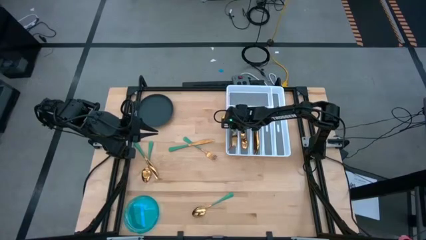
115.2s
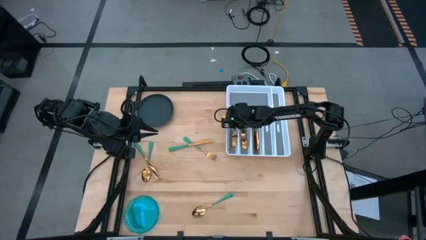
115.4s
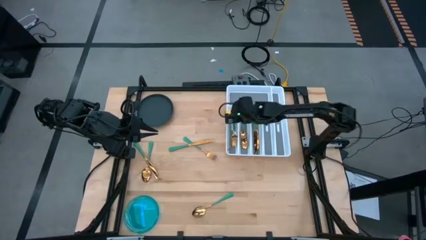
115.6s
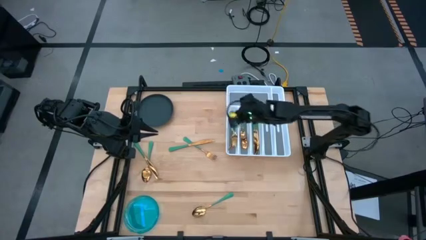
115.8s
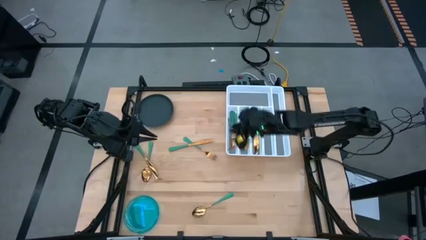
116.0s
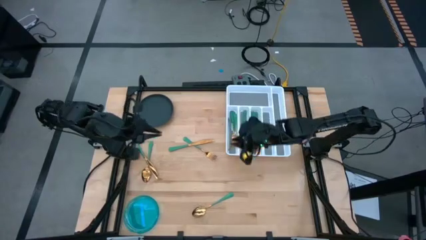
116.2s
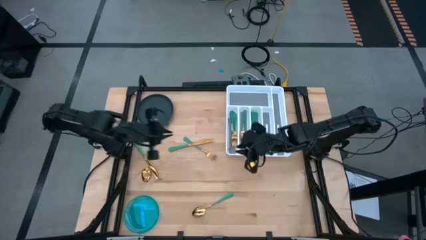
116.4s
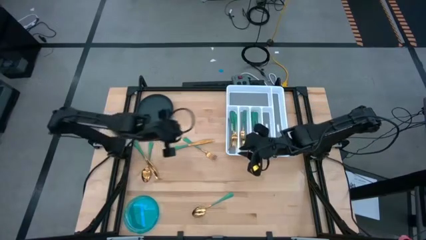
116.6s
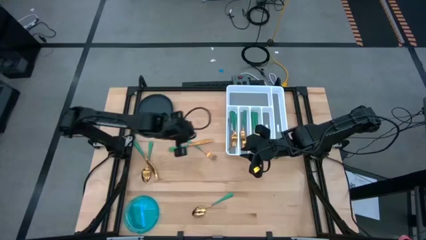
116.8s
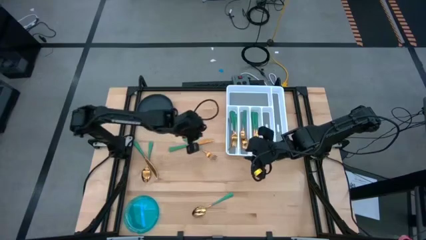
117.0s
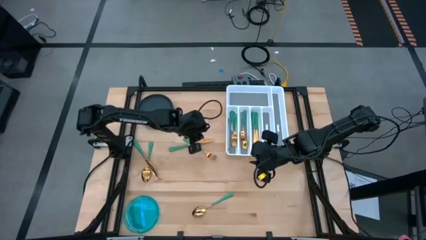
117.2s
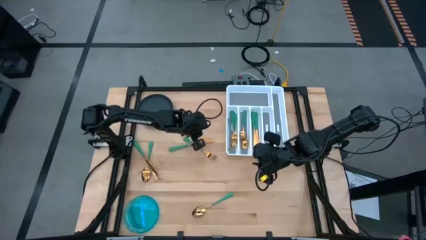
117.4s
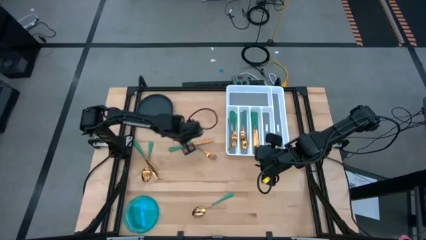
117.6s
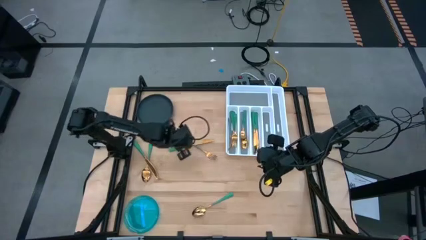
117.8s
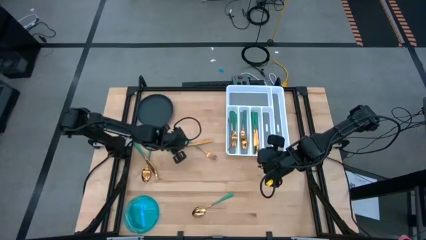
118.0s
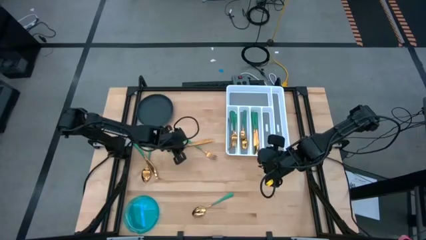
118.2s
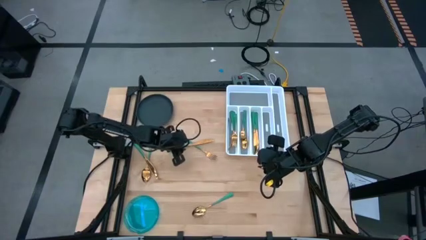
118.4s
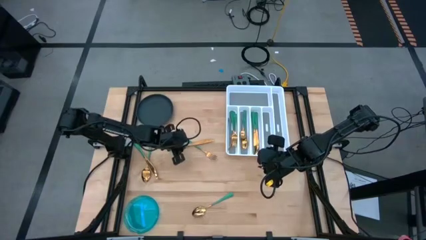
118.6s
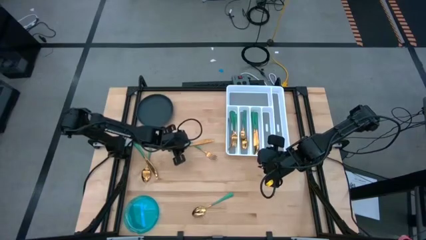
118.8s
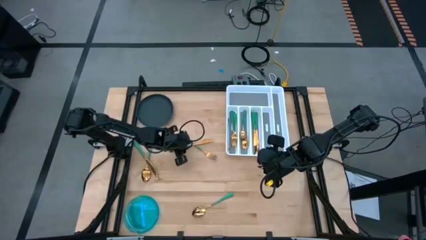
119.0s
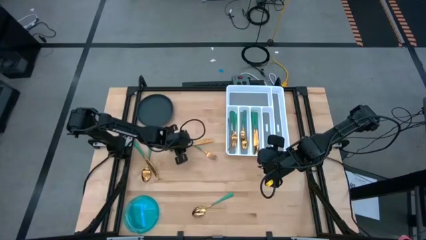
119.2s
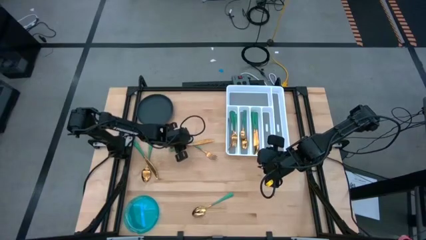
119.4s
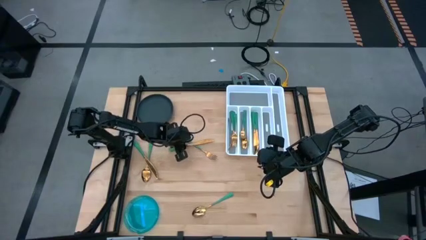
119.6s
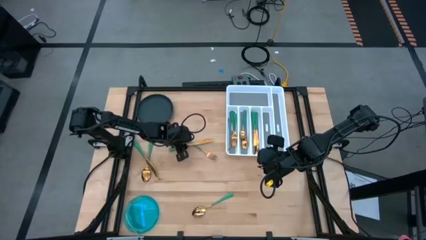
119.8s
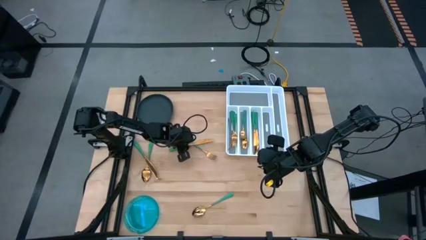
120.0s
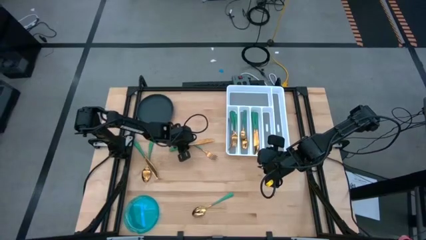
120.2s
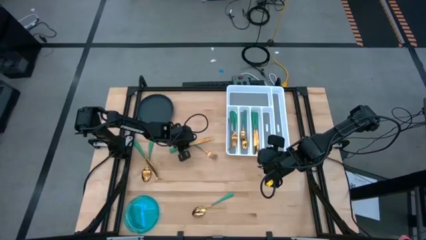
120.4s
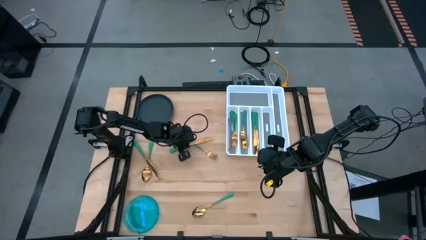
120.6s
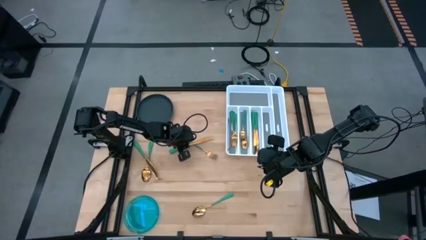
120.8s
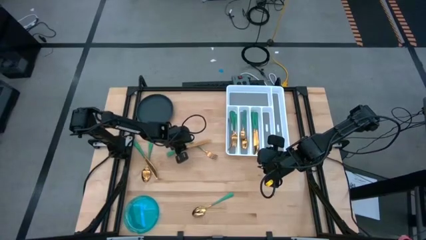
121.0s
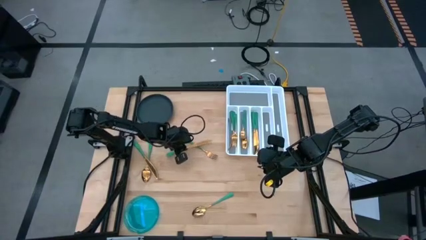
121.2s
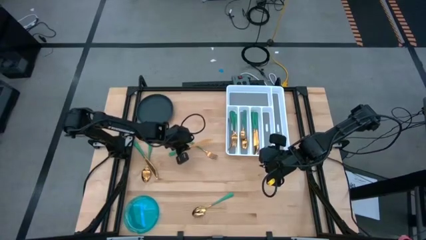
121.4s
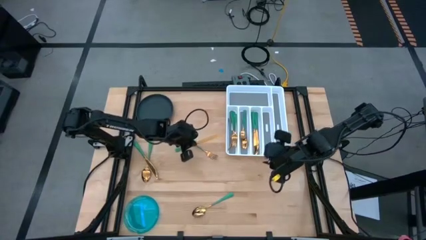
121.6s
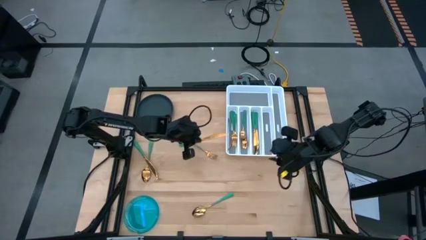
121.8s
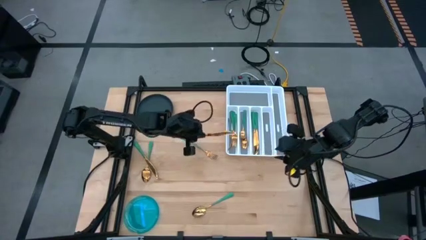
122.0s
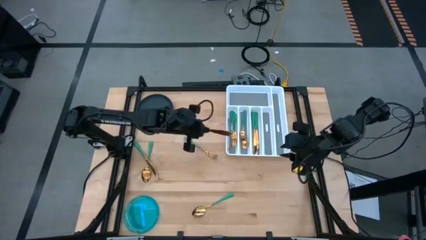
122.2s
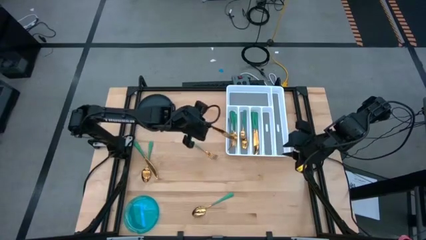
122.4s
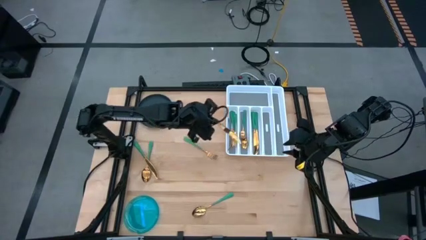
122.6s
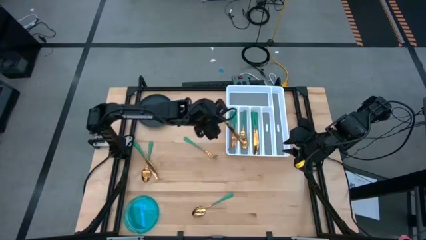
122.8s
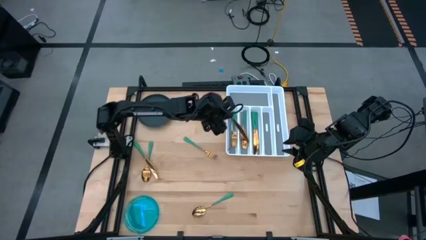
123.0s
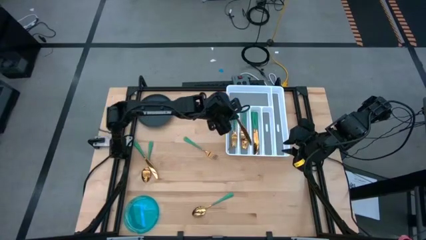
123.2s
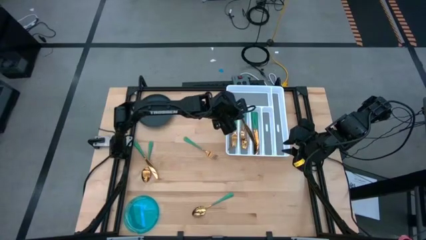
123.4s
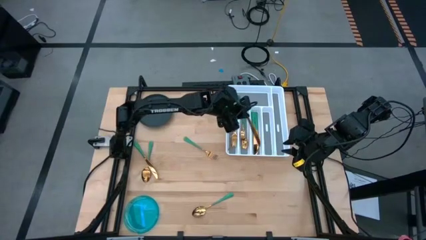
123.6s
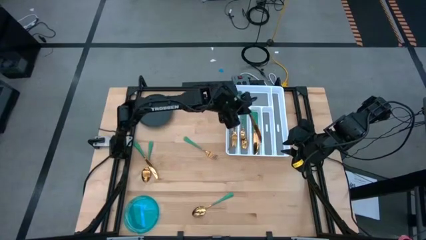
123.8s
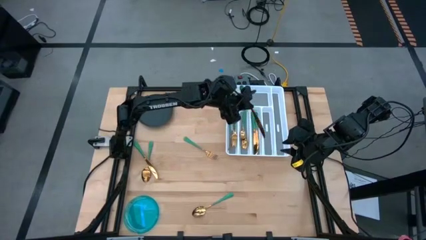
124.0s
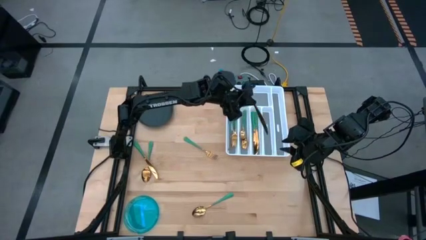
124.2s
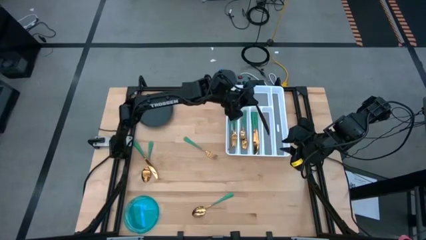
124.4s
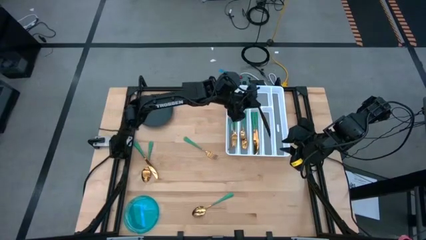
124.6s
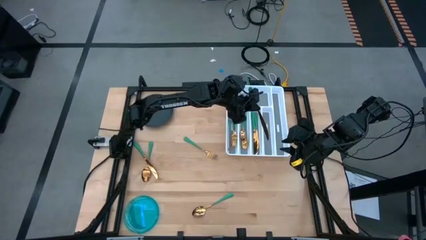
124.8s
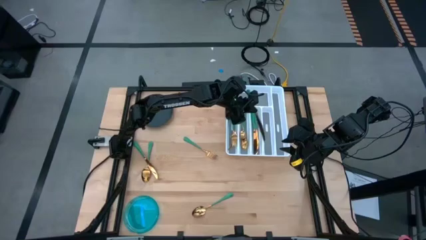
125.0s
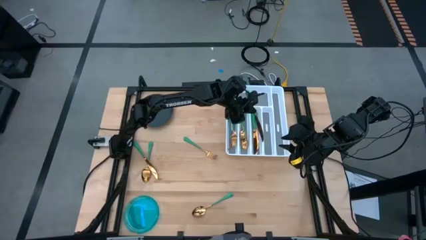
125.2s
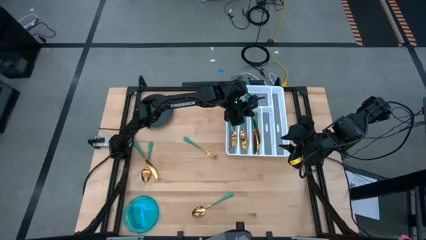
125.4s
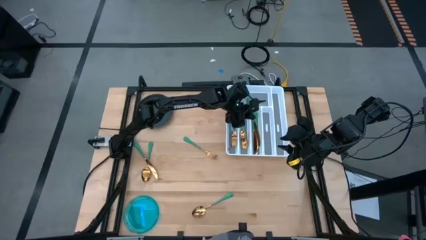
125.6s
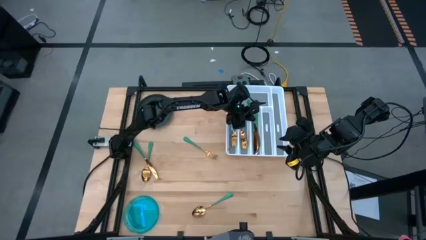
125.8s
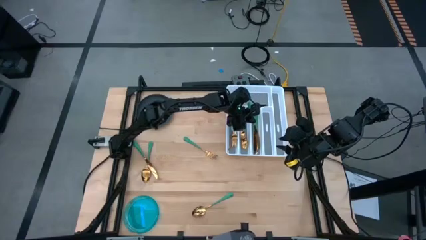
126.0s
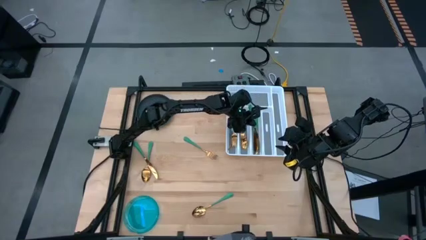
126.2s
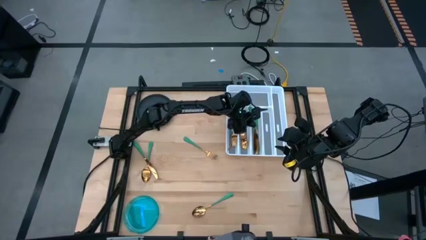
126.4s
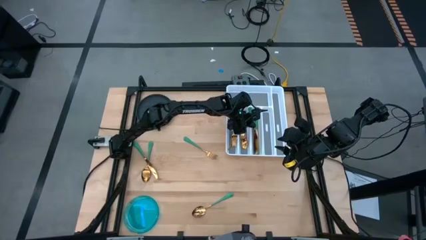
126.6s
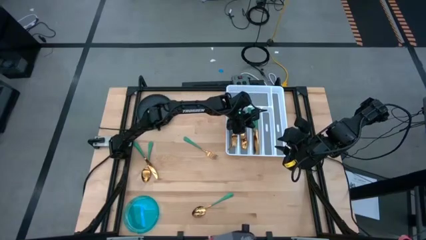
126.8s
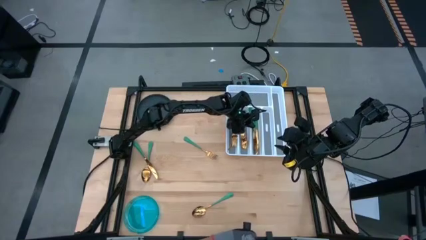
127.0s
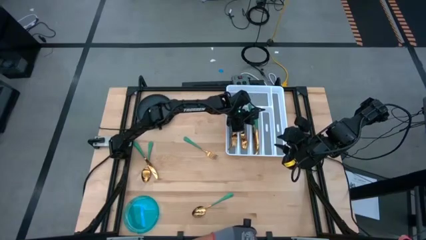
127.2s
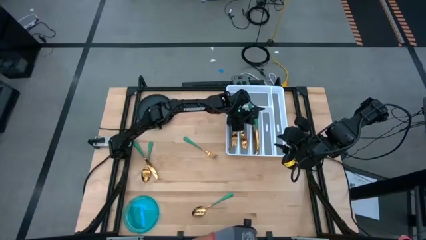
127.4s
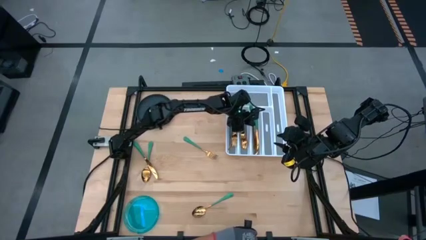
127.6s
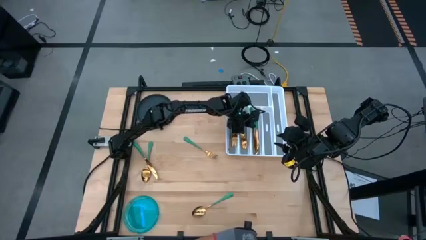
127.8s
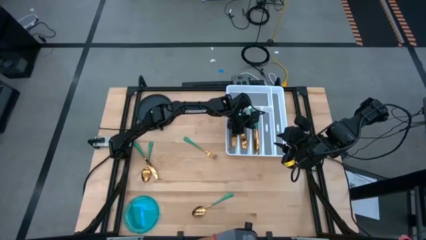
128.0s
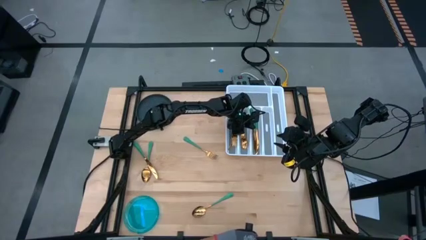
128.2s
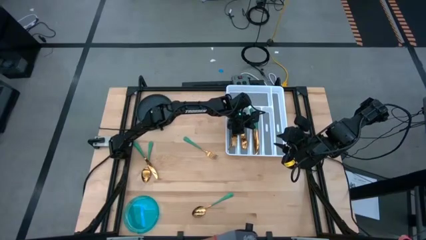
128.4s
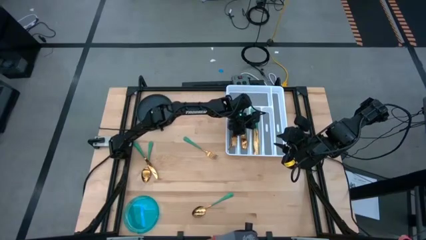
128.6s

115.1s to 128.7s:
Task: Sort silverware
Put the green knife into the white silverware organizer

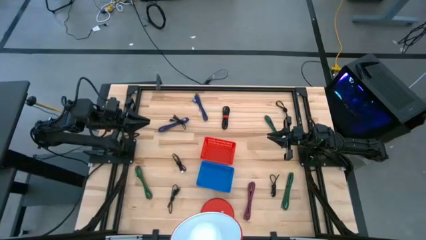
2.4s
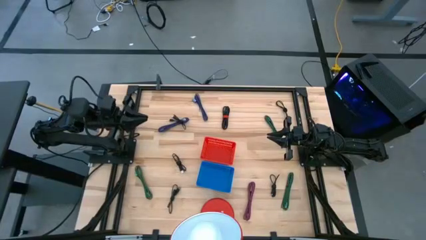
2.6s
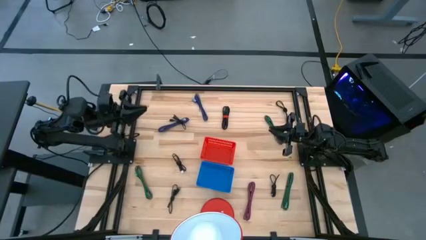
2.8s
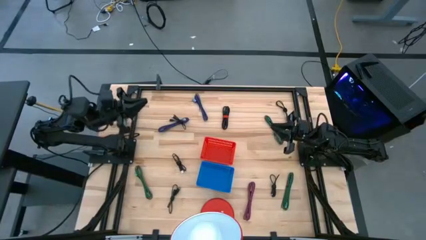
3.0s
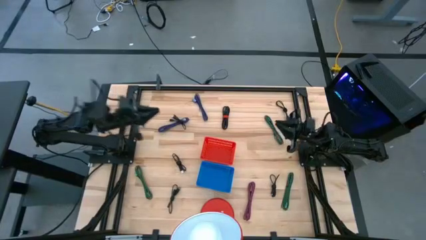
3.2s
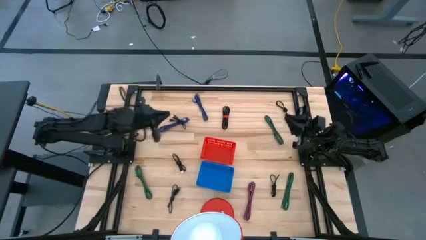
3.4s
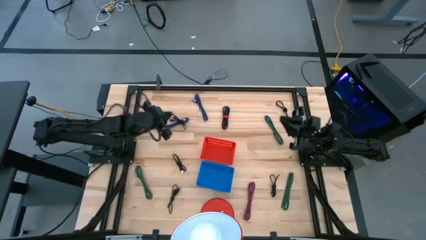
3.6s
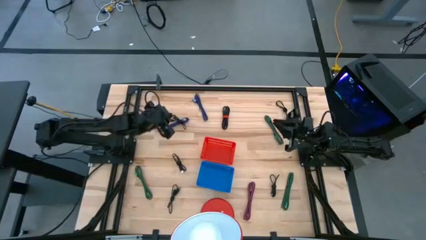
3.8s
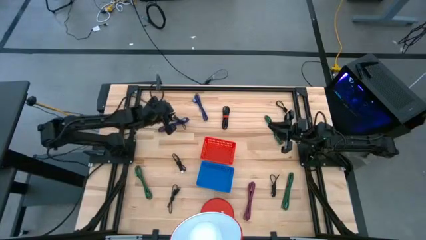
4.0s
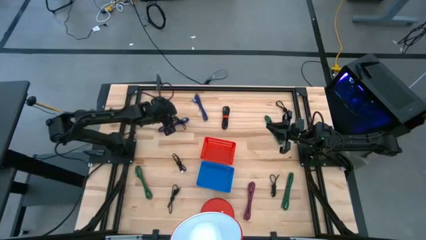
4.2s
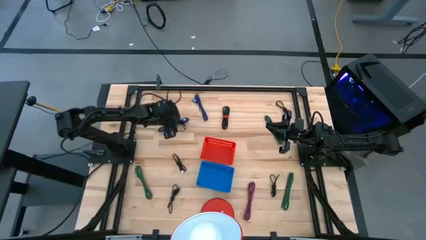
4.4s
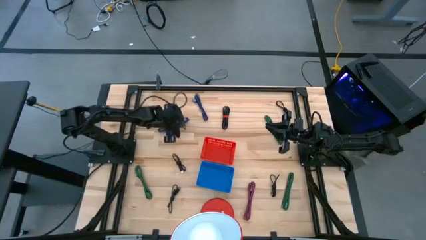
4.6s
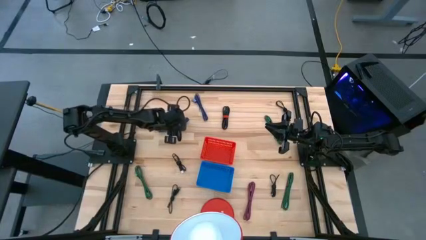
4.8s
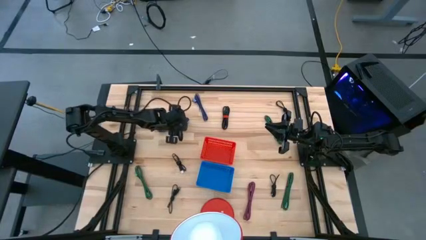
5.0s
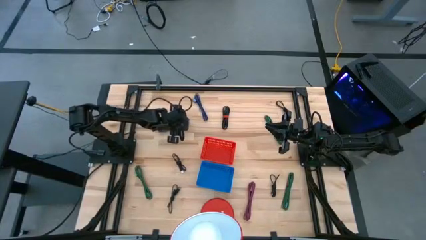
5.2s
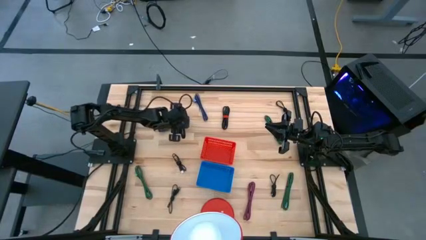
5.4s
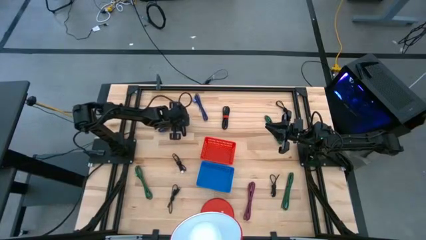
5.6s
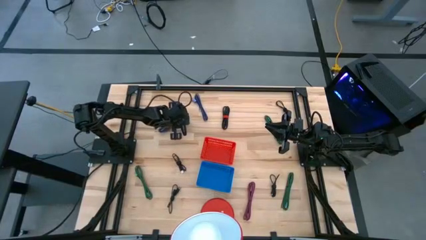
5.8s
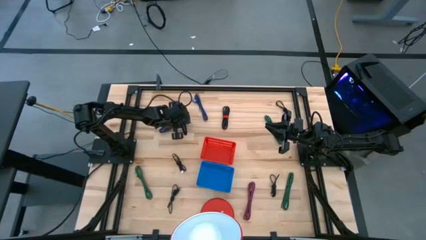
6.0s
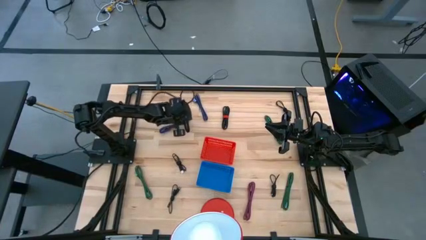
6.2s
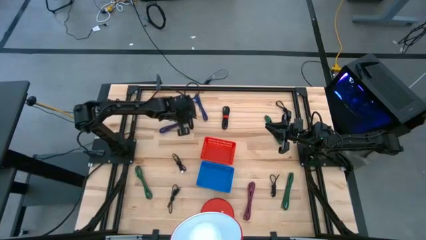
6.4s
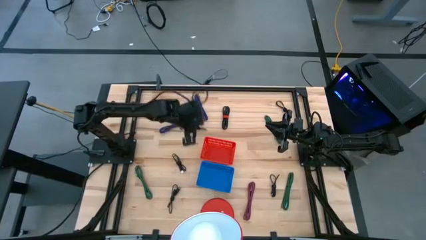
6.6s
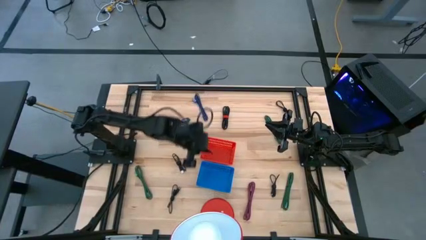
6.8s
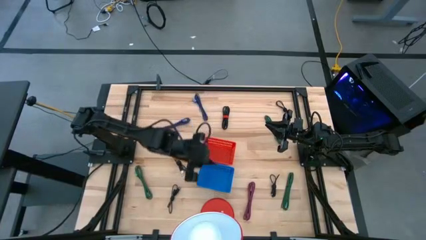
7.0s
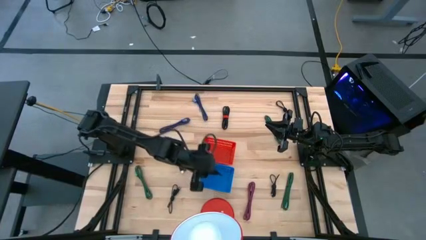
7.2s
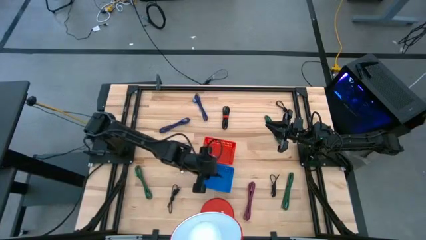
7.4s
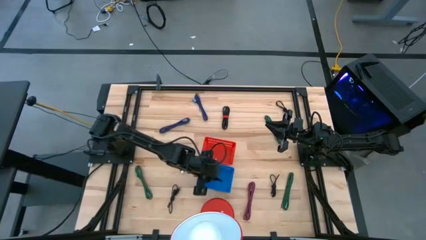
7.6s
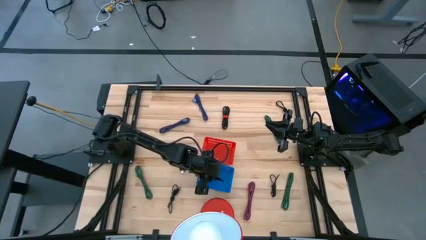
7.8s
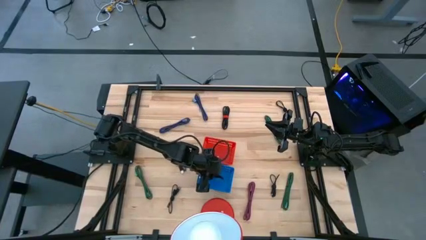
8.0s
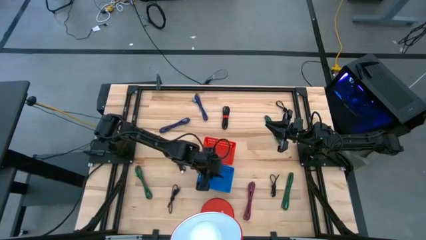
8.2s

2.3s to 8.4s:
Task: Pick & Place USB Port
Put the small black USB cable into the blue bin
